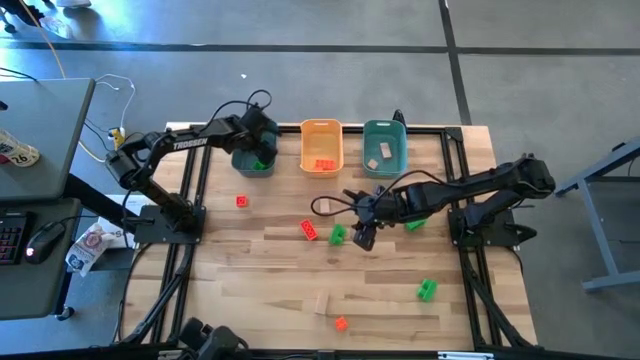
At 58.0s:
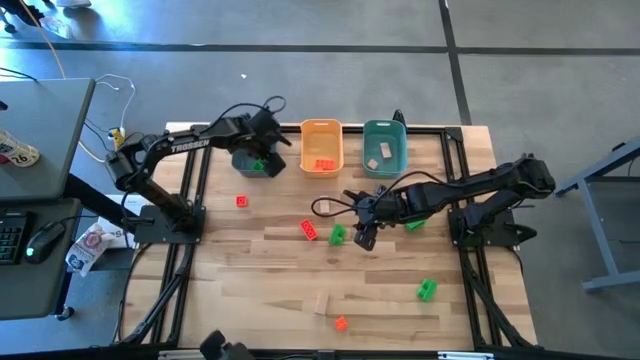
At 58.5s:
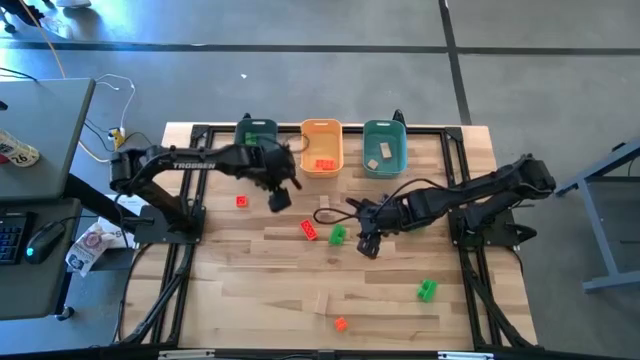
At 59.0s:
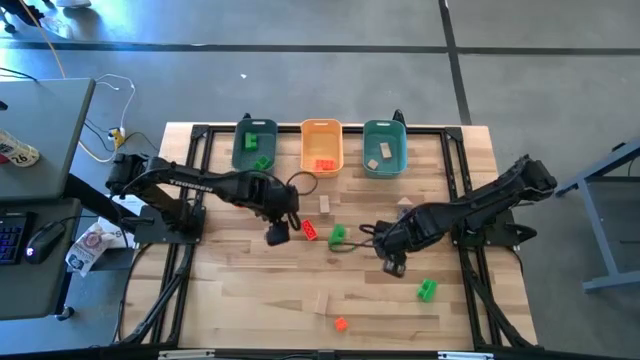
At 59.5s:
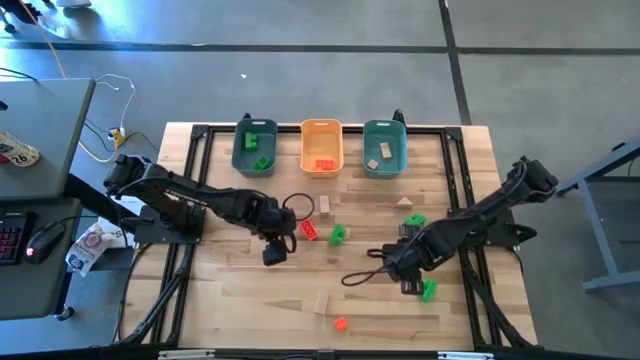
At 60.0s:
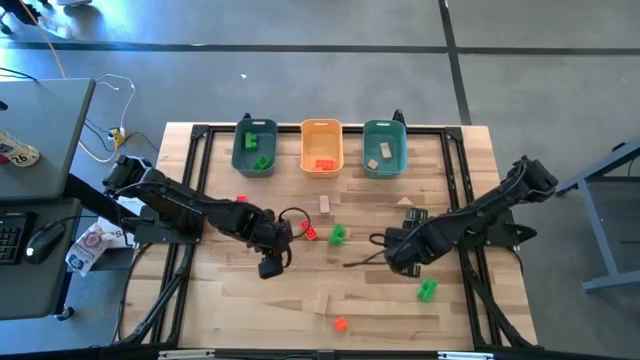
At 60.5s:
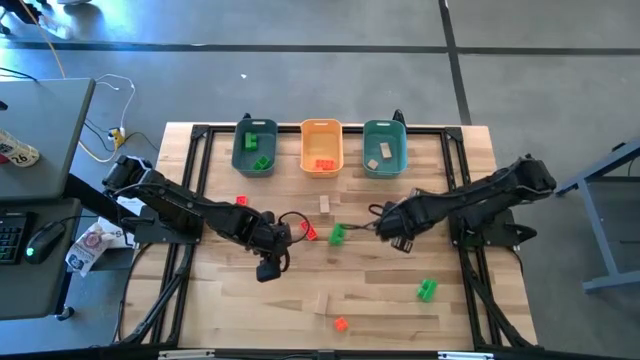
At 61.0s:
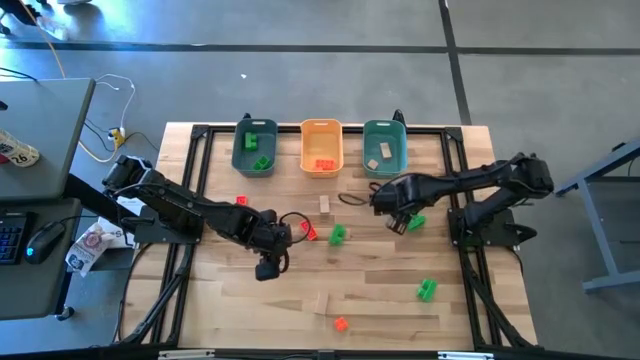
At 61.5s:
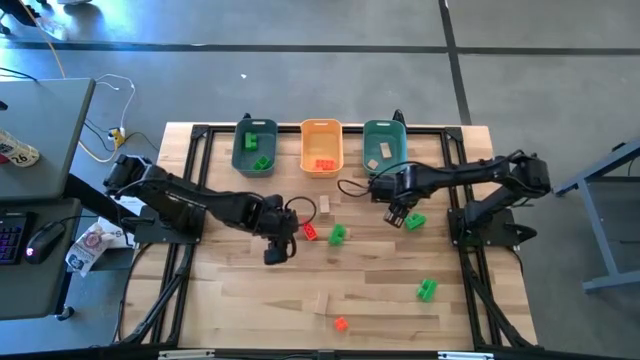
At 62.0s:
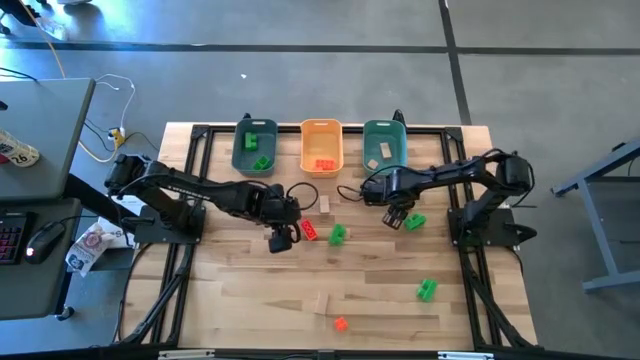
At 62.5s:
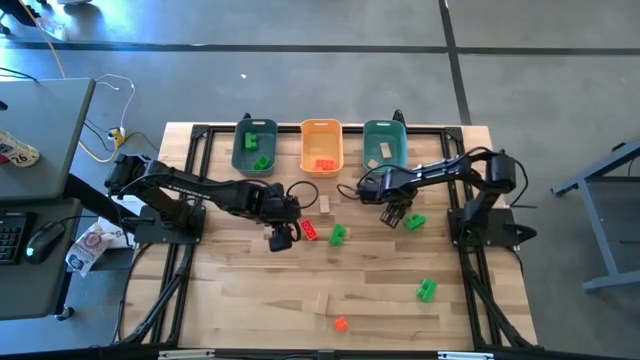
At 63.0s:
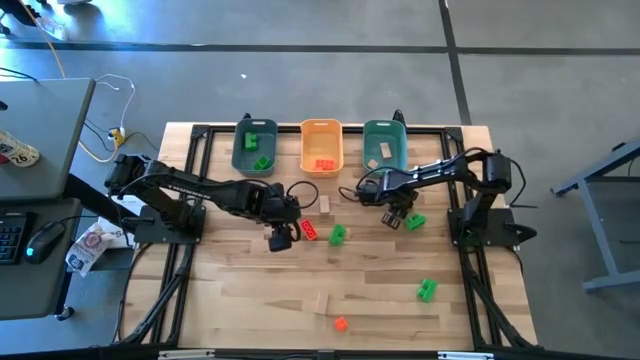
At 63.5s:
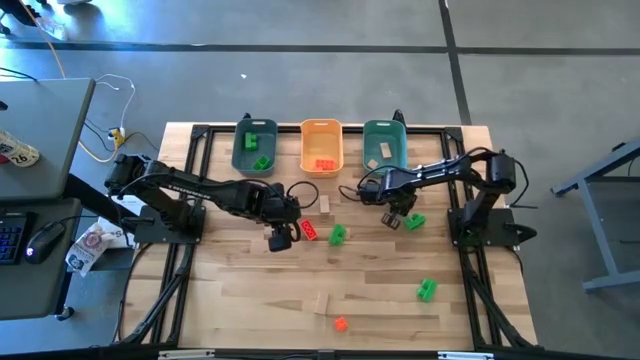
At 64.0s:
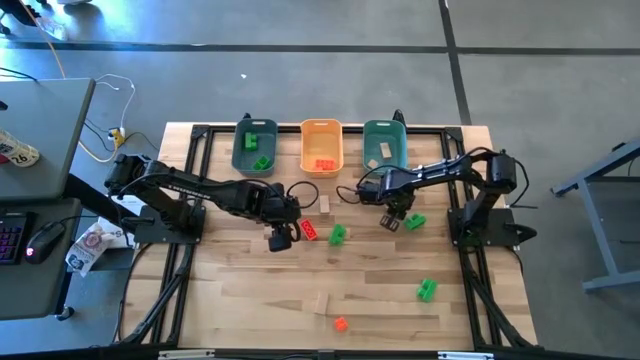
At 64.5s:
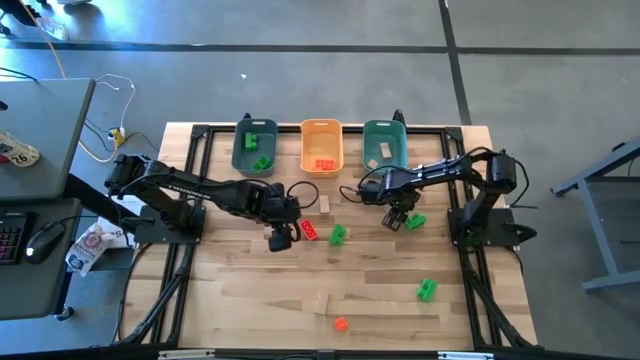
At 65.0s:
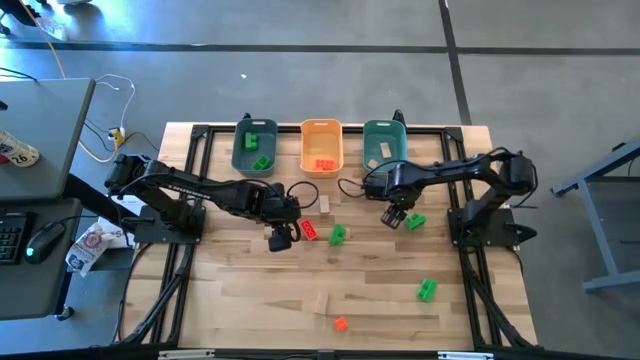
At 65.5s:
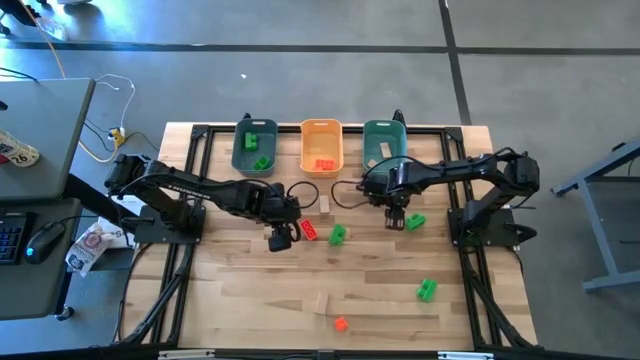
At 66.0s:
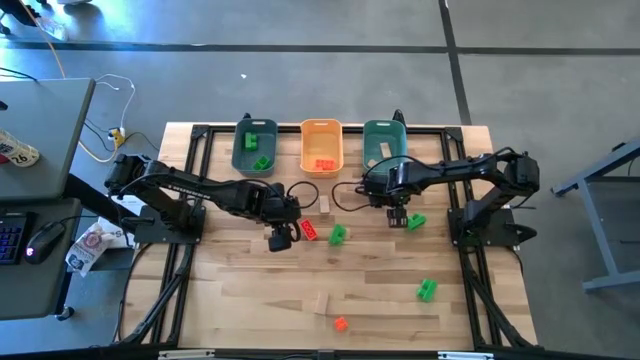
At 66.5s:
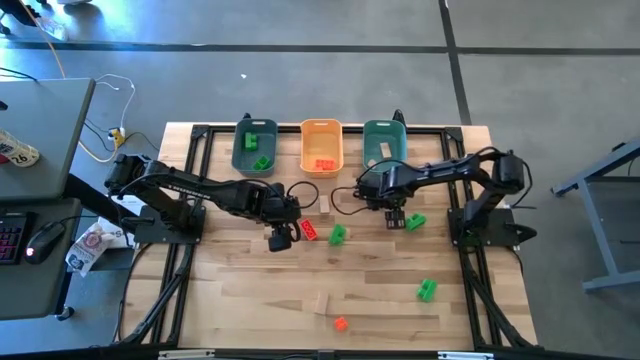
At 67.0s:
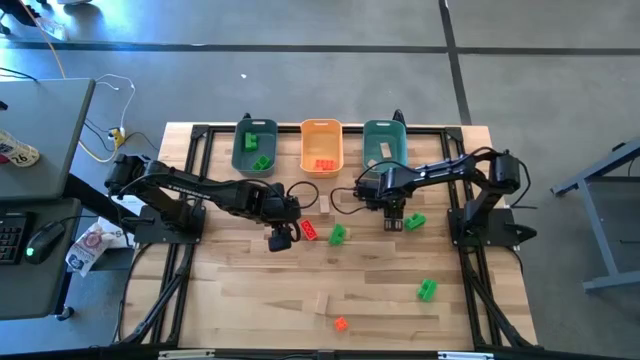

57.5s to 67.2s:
Task: Sort & place blocks by color
Put the brown block into the green bin

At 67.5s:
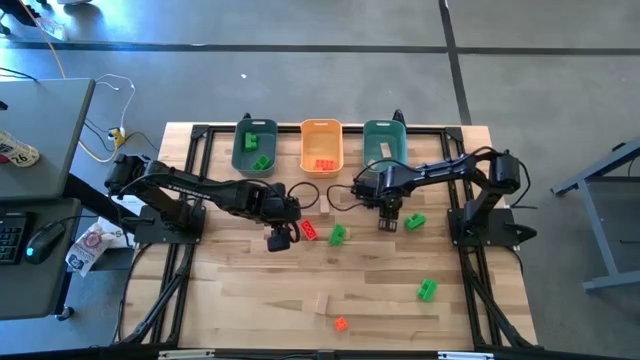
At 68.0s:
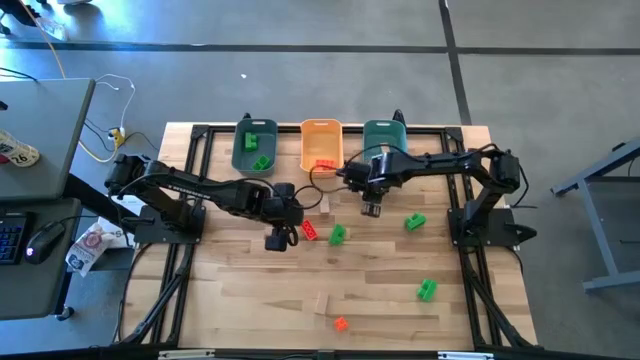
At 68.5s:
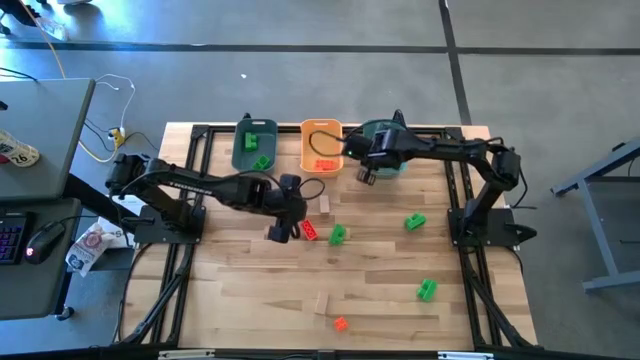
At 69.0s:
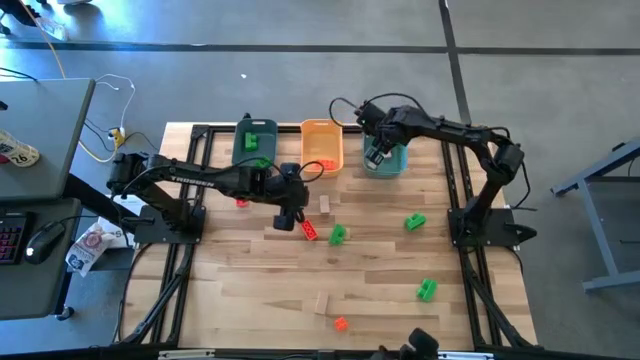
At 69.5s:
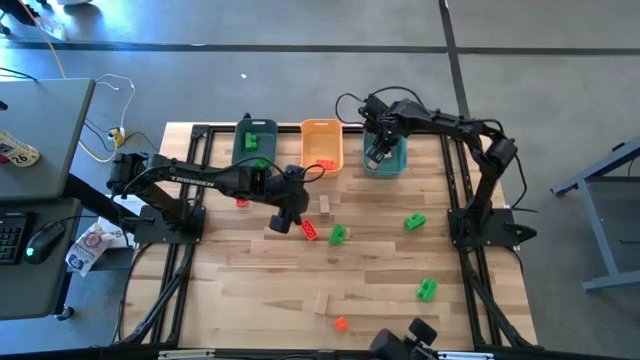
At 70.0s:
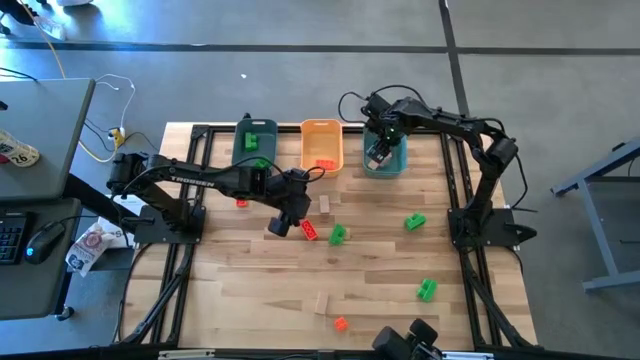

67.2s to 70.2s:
Put the brown block into the green bin

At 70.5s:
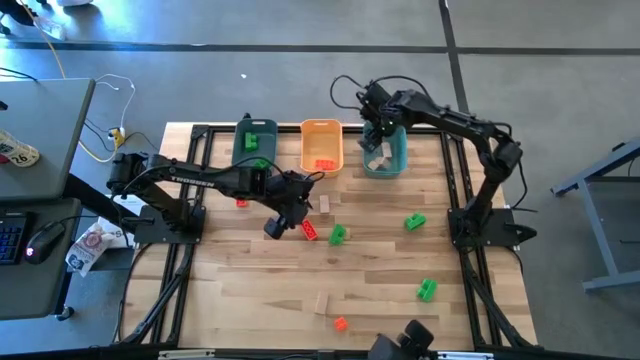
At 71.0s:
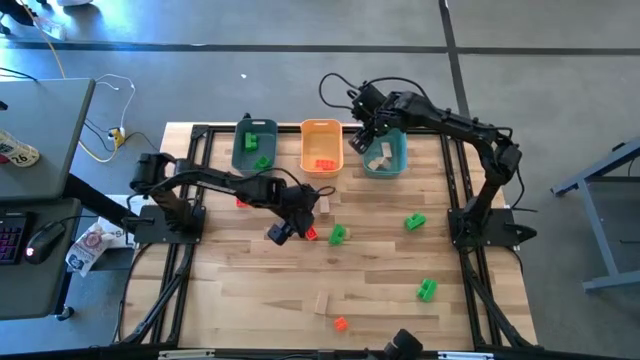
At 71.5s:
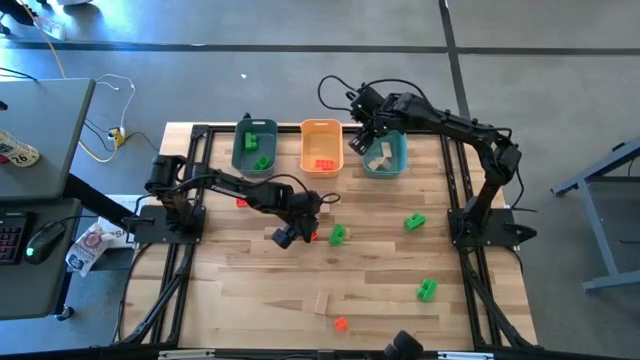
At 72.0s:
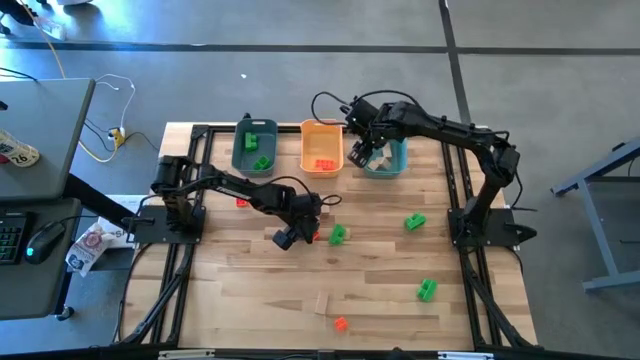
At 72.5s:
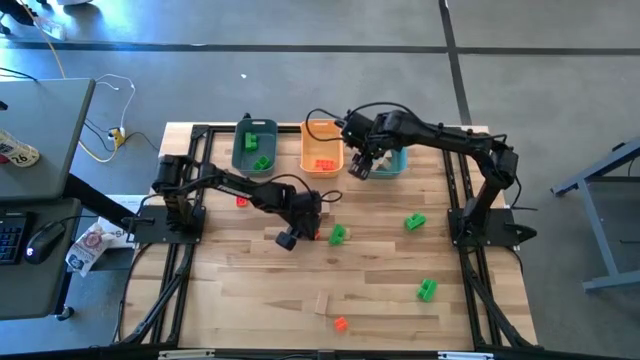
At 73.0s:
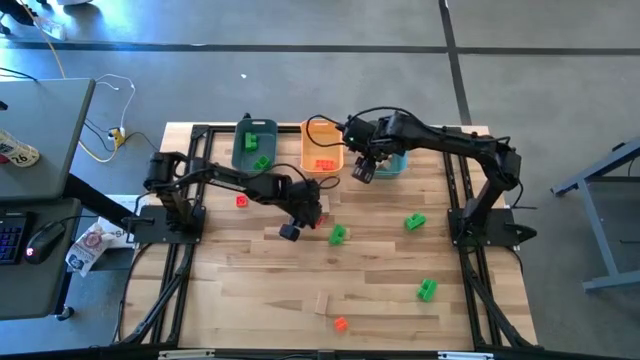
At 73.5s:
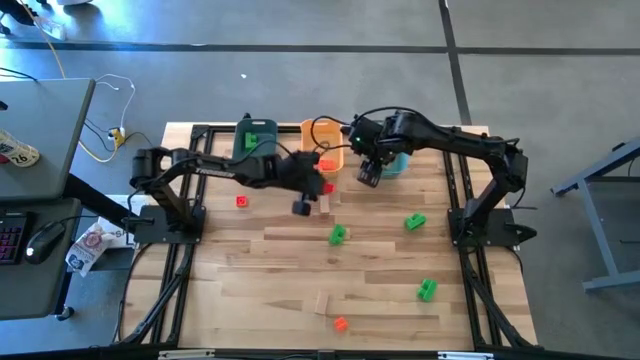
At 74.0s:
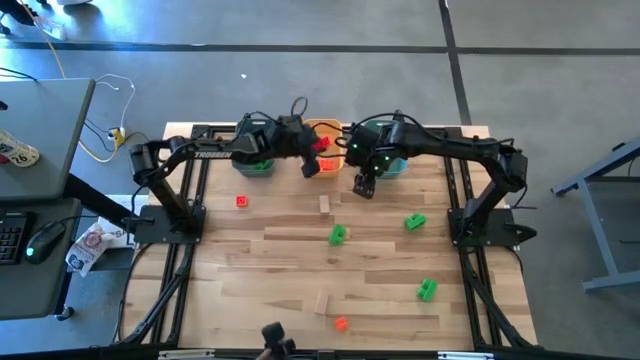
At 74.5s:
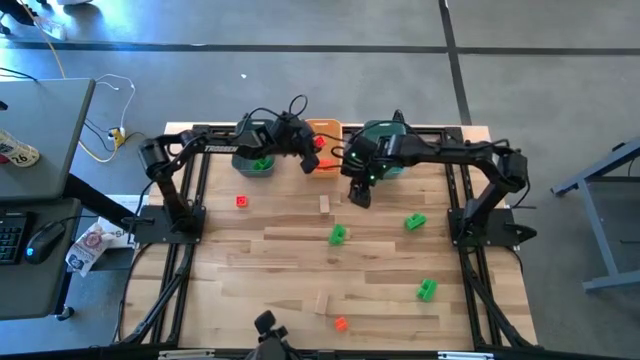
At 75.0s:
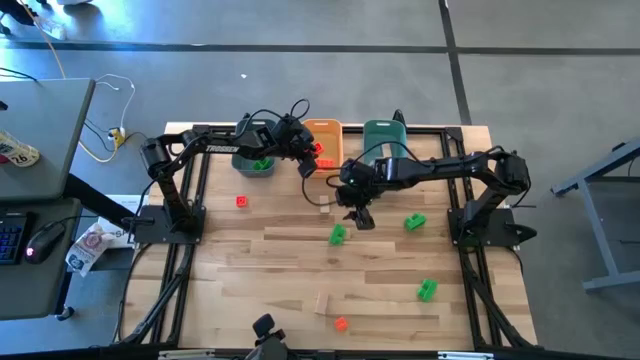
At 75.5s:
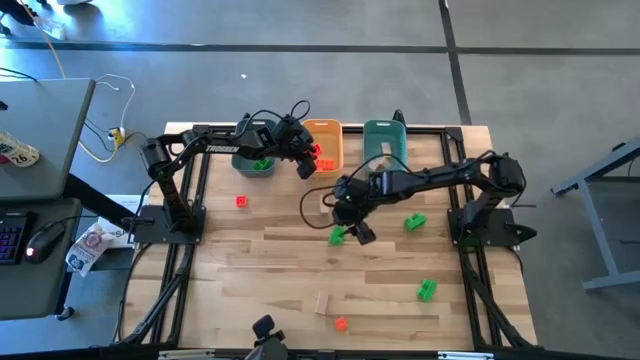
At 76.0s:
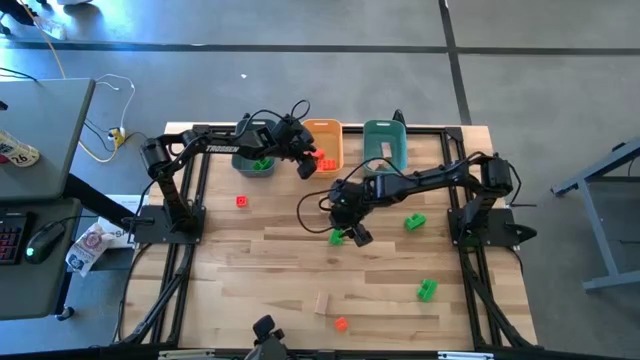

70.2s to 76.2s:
Put the orange game piece into the yellow bin

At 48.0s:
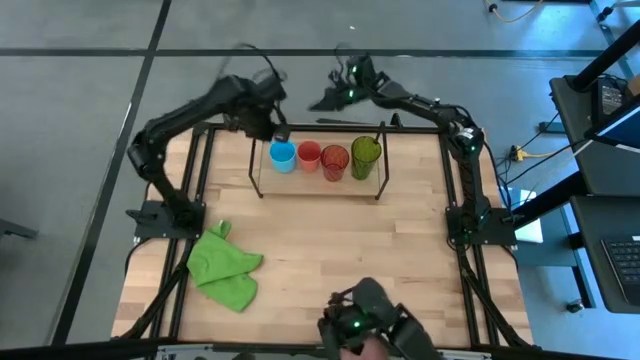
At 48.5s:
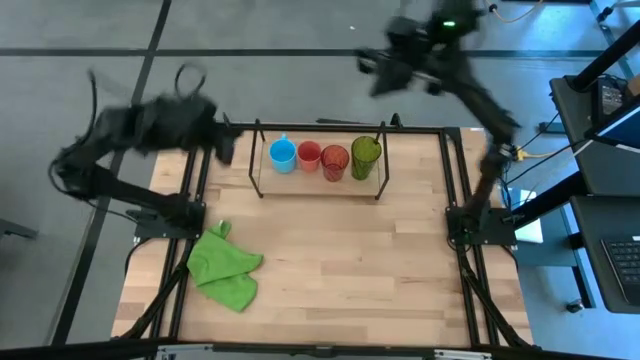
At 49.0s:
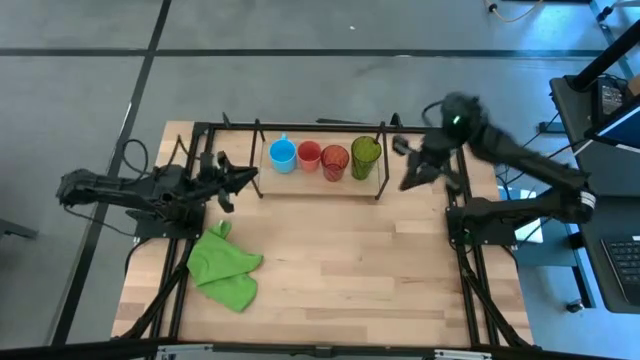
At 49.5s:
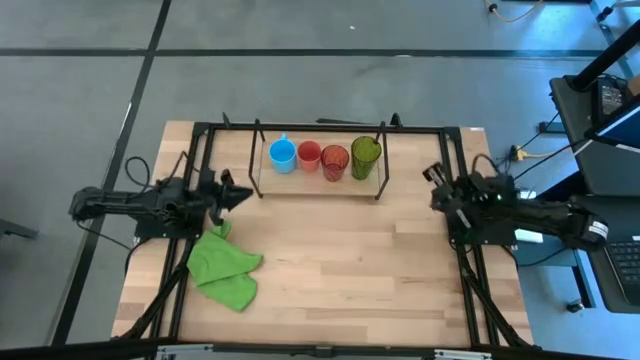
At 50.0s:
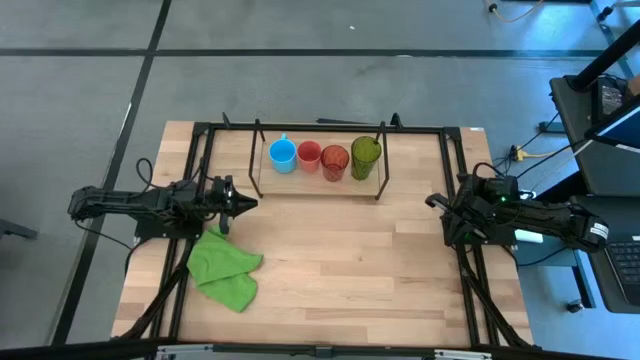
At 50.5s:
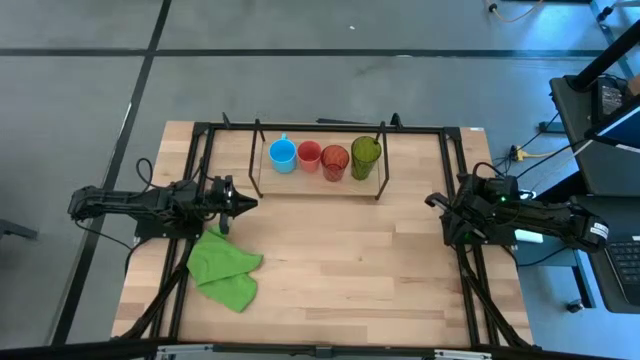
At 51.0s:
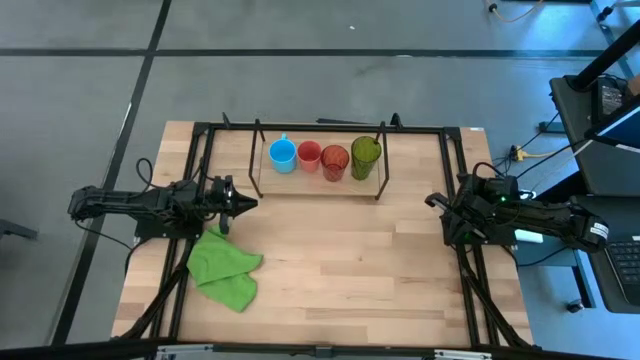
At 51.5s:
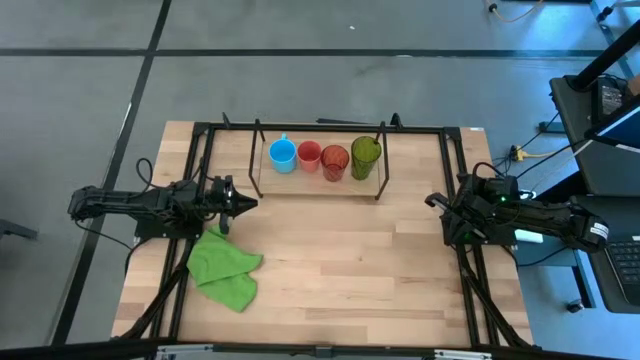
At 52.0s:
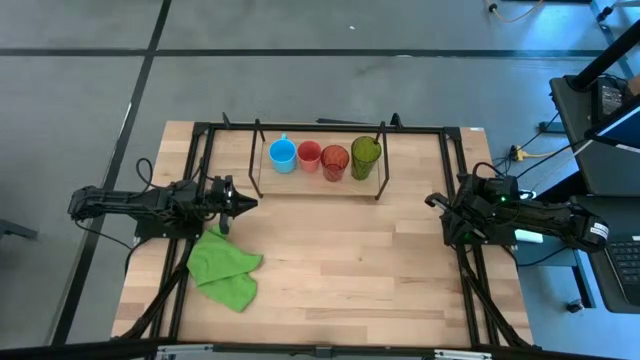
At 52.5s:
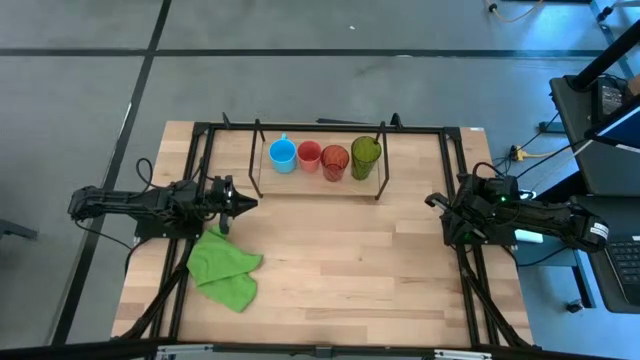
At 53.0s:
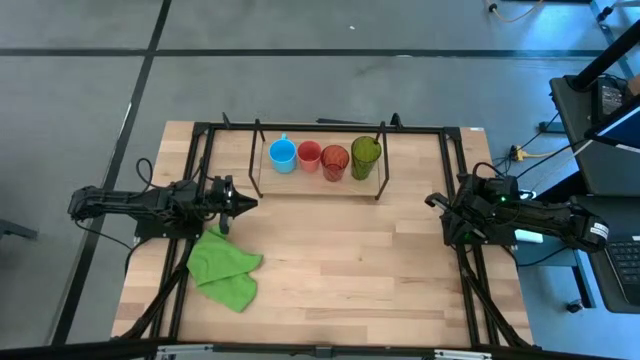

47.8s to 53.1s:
Task: Stack small to large cups/mugs on shelf
Return to Home Position
